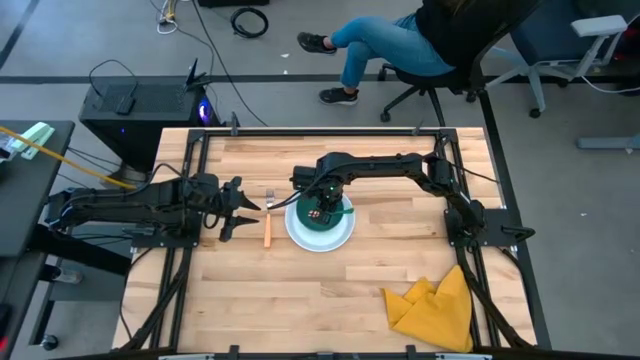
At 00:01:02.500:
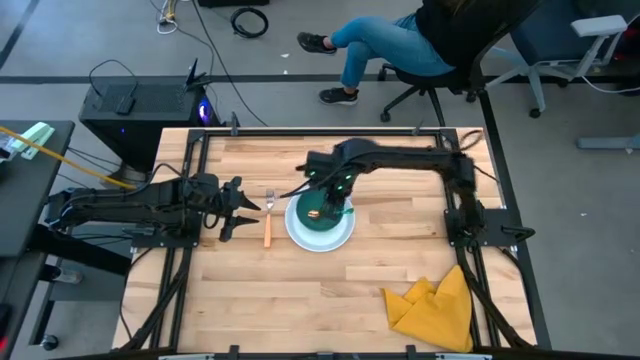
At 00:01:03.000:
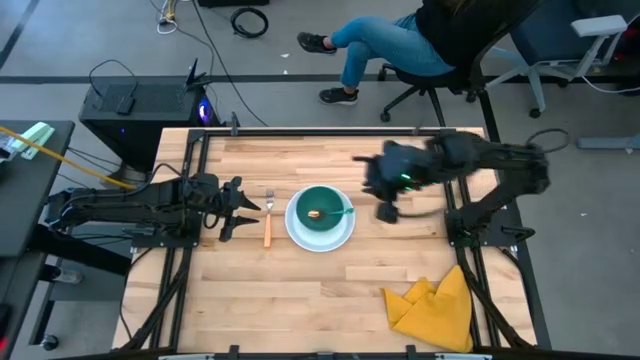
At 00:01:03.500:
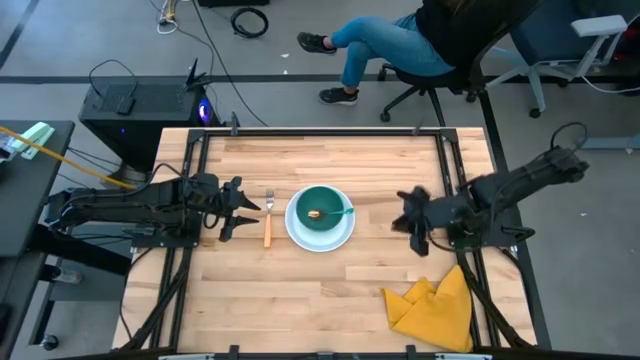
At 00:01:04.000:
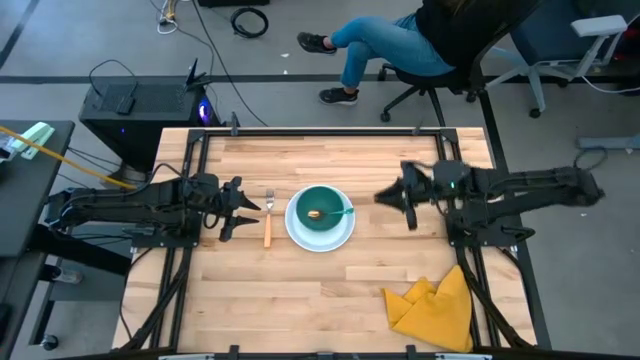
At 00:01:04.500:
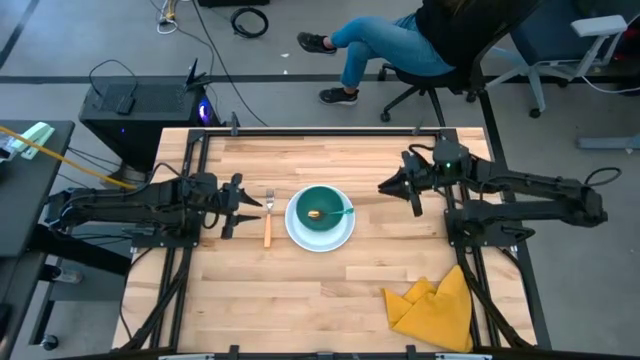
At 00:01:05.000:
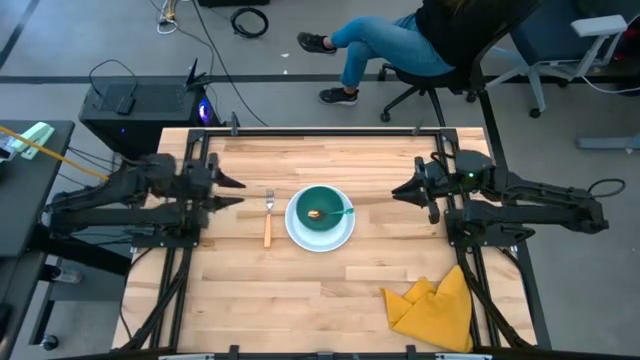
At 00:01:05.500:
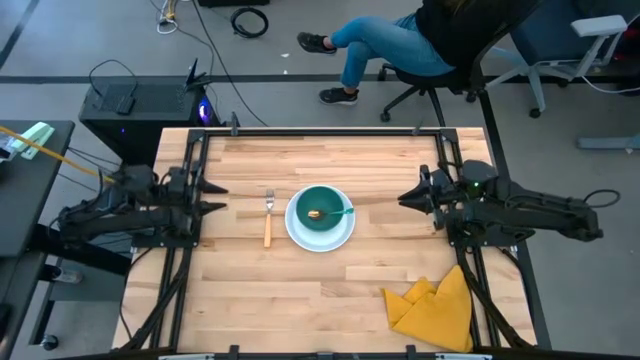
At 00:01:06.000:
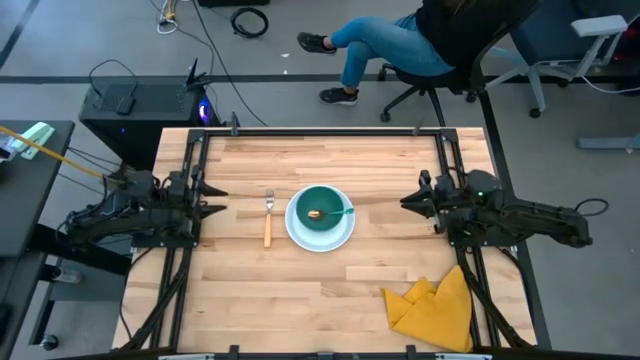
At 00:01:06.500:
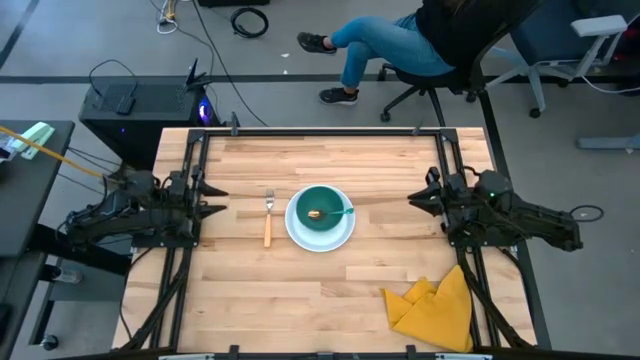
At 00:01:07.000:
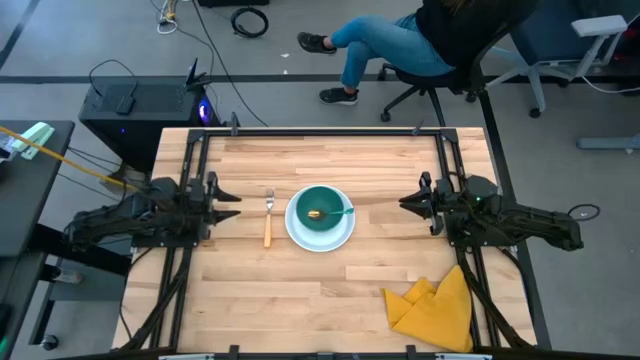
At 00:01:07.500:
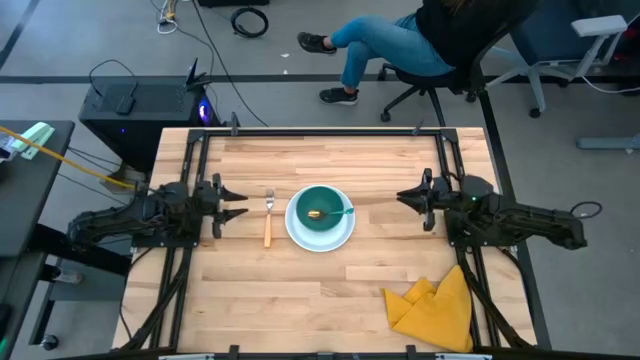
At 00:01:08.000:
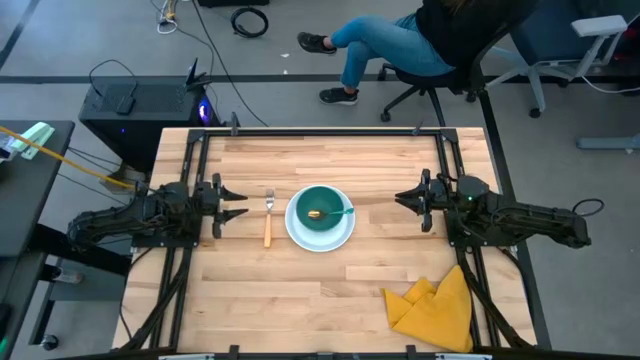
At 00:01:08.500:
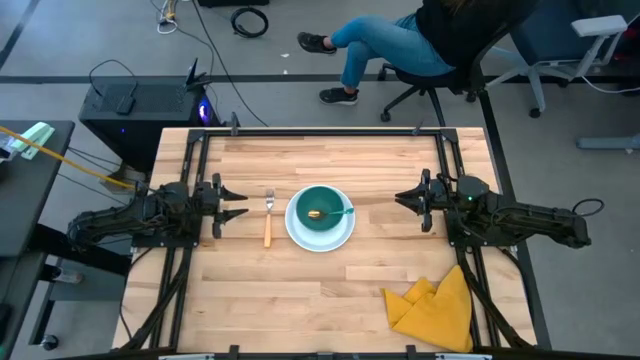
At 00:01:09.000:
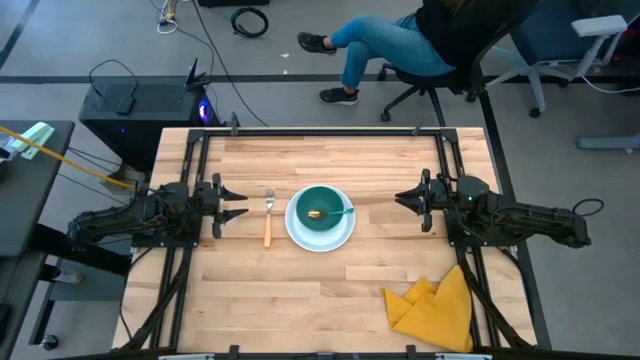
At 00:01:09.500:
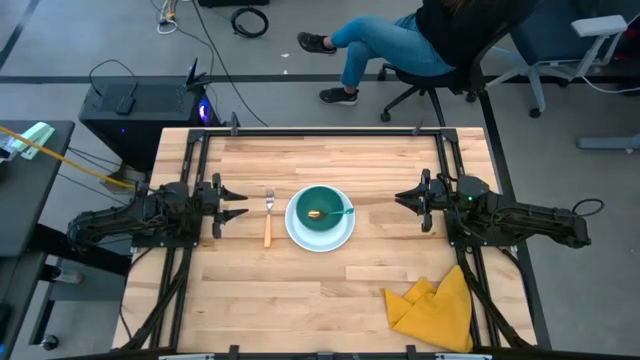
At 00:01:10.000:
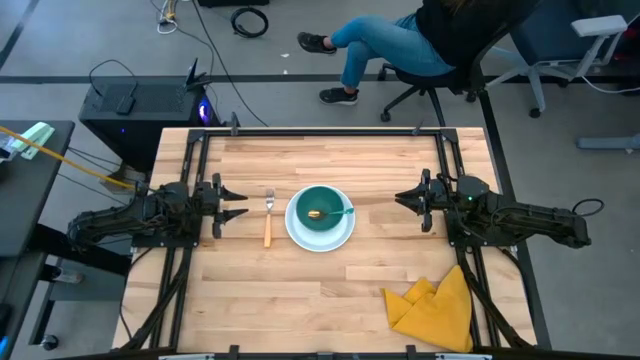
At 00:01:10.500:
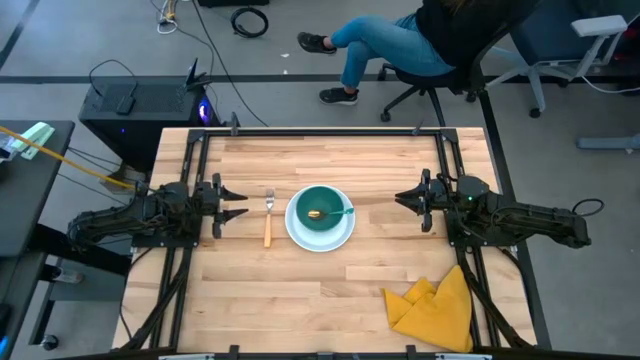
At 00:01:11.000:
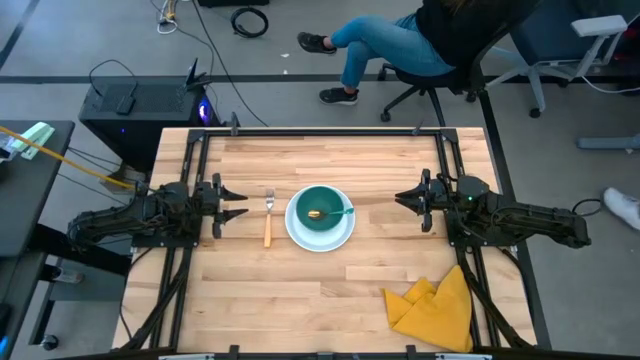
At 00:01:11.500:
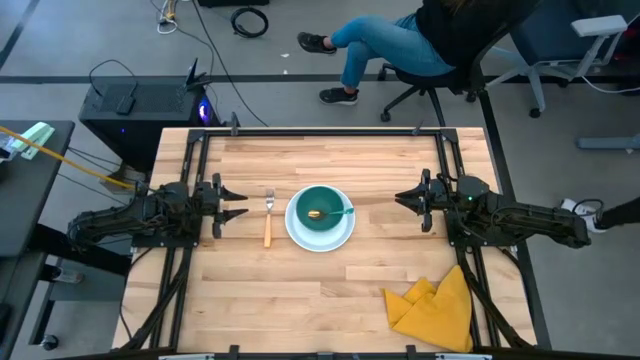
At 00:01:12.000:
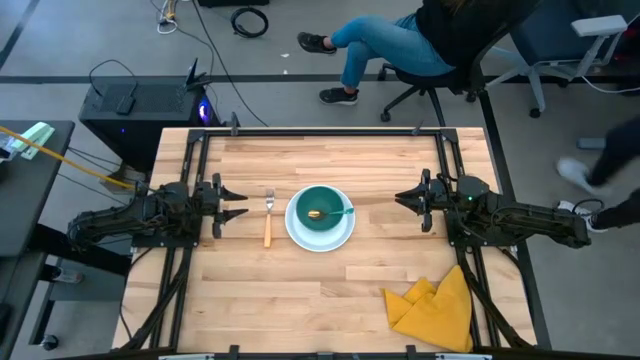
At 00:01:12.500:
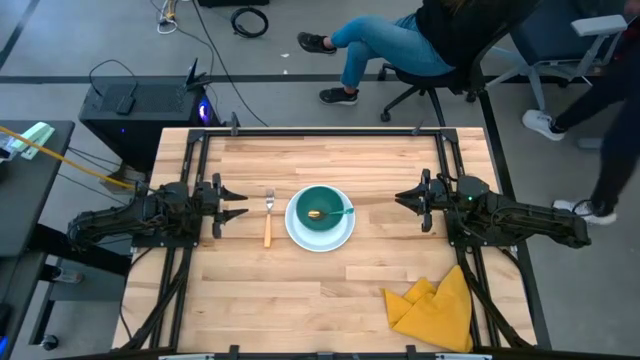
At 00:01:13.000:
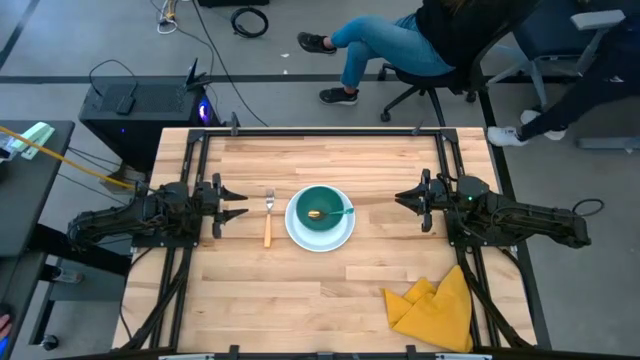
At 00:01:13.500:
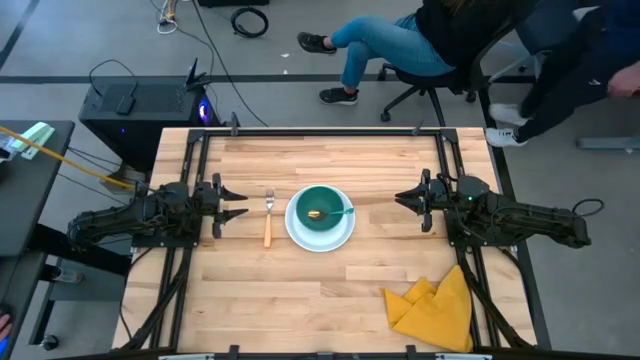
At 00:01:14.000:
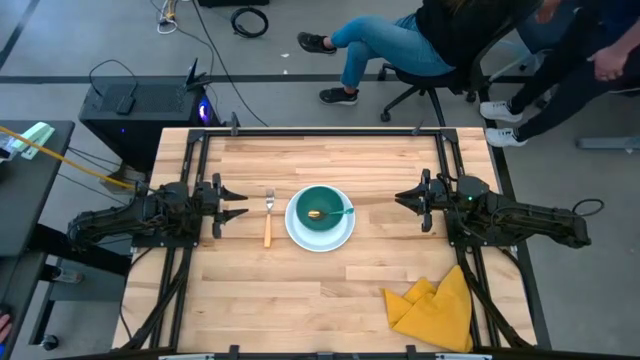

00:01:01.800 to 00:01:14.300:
Task: Set table place
Return to Home Position

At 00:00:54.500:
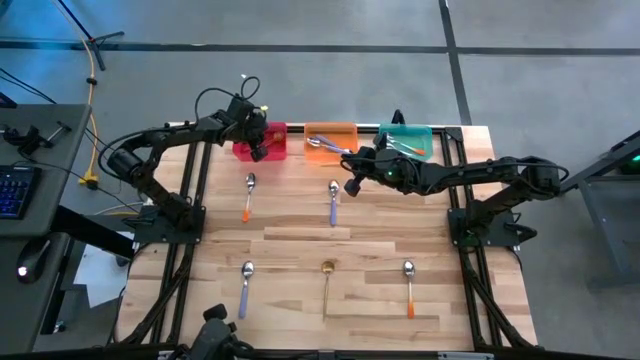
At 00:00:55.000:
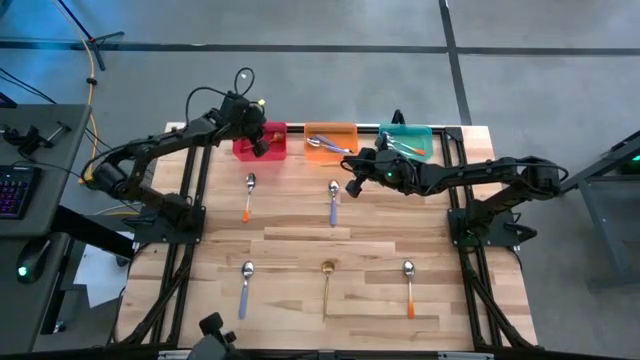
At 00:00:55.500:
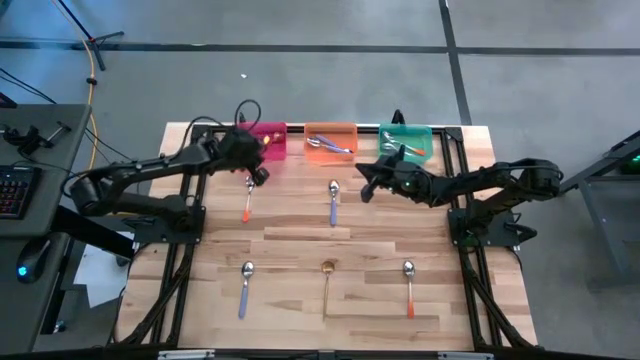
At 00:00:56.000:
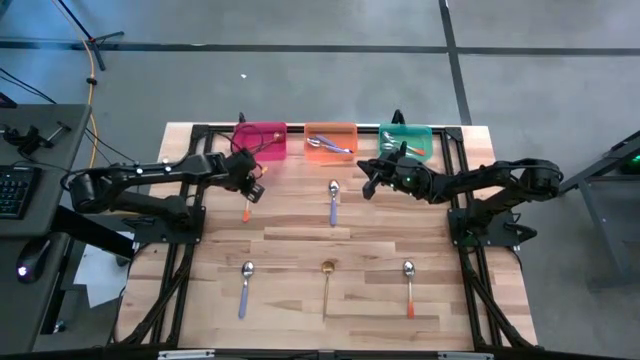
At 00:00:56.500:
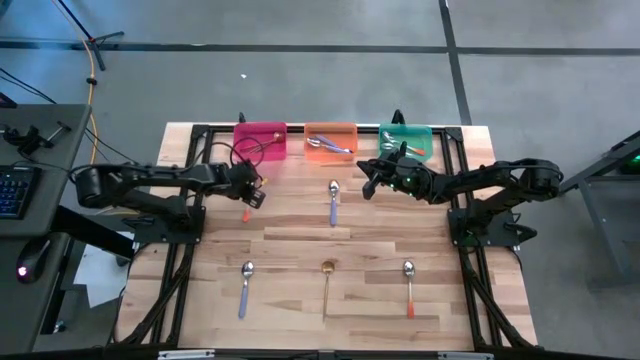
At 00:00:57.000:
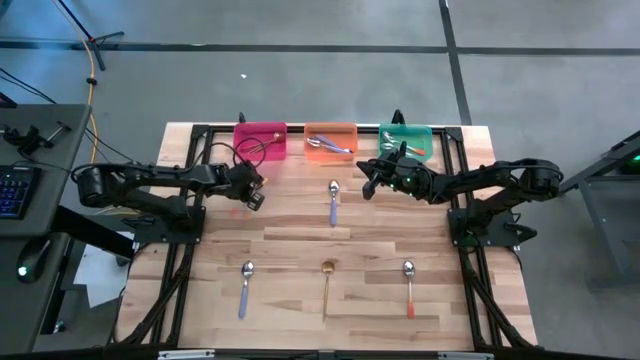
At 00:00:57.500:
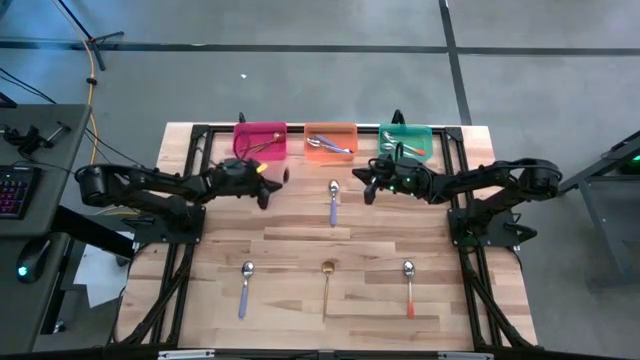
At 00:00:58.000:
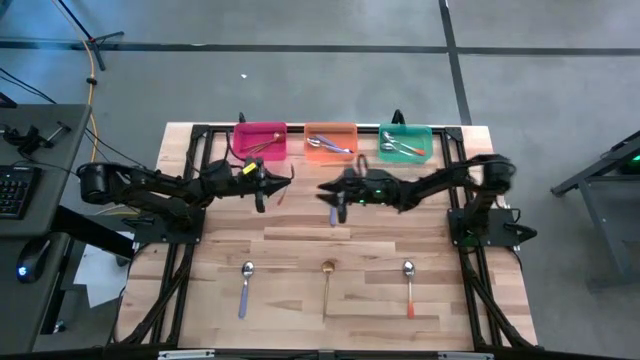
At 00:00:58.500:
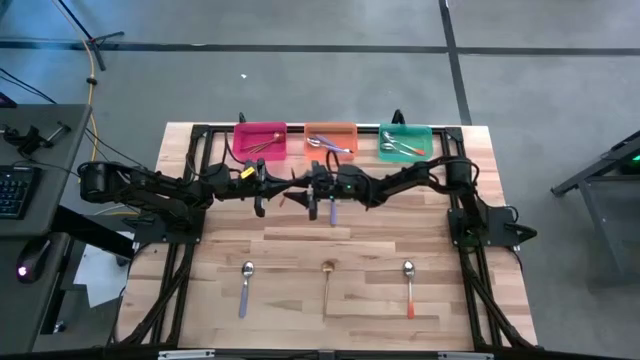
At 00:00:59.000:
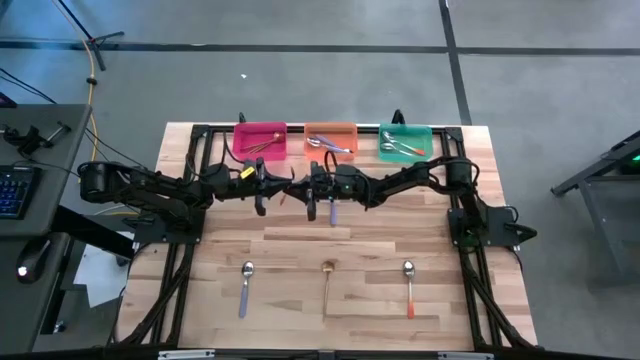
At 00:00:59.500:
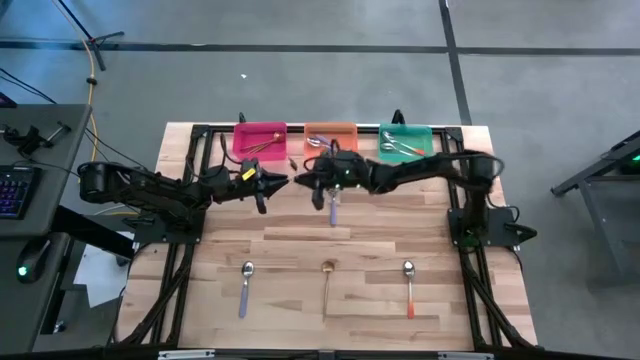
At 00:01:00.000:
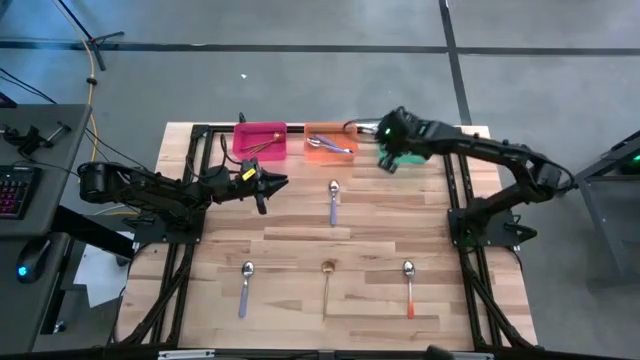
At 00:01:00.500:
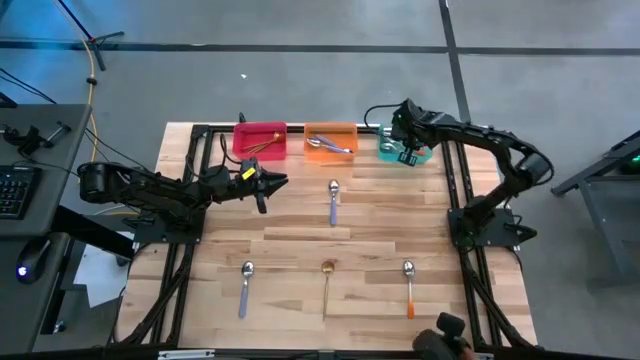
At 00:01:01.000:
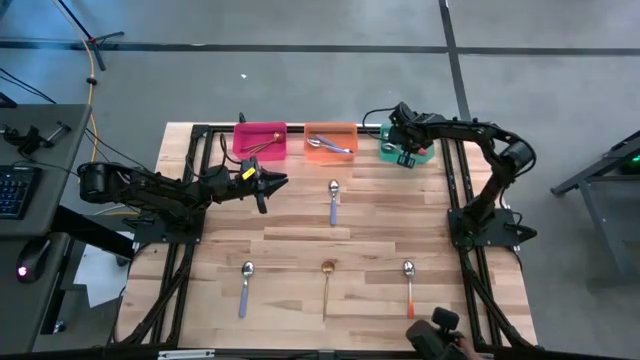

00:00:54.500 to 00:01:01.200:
Task: Sort silverware by color (type)
Put the top orange spoon into the green bin

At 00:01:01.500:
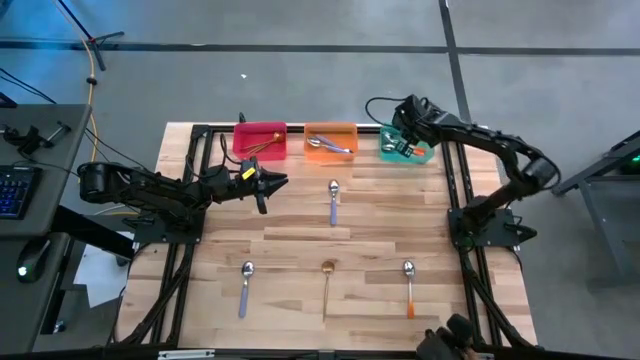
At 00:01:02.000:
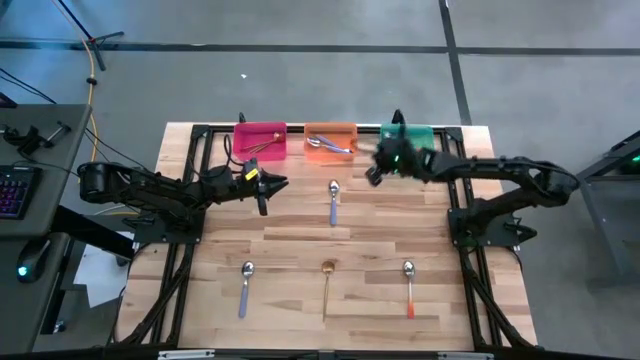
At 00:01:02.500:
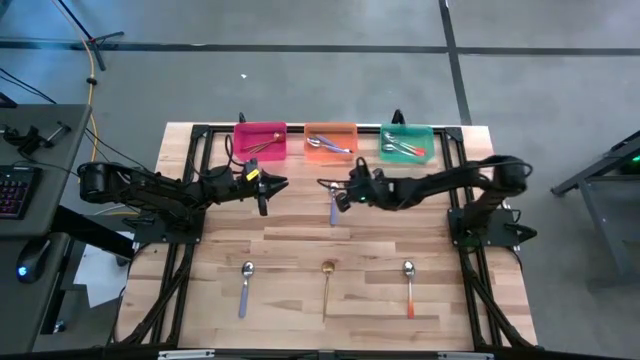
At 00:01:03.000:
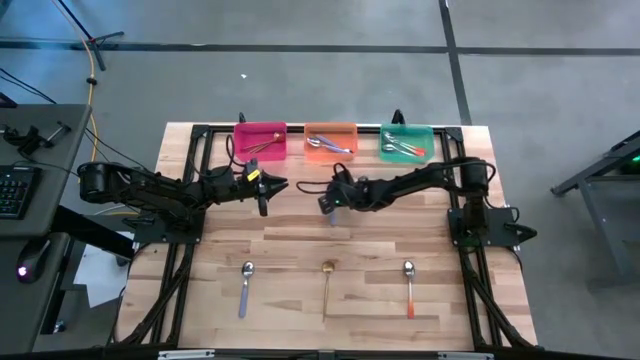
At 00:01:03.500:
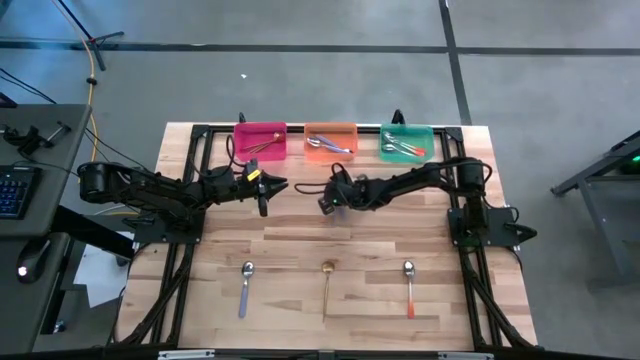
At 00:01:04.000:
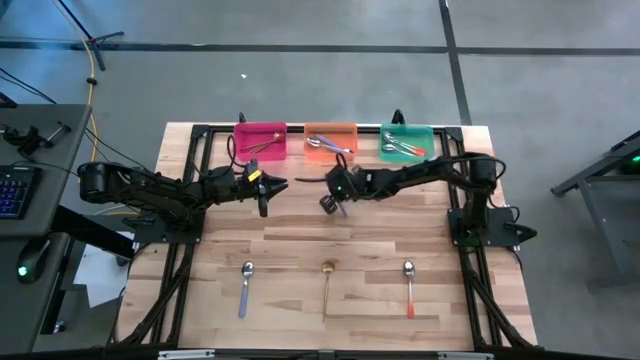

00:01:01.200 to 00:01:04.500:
Put the top light violet spoon into the orange bin
